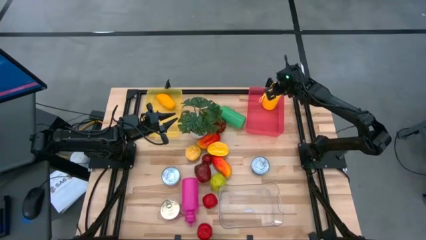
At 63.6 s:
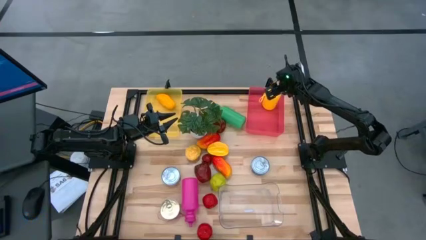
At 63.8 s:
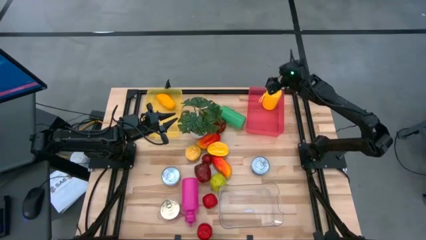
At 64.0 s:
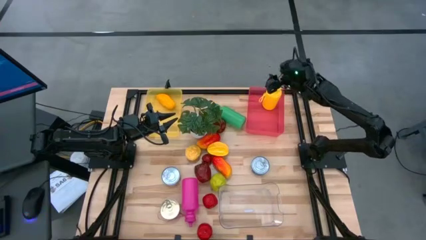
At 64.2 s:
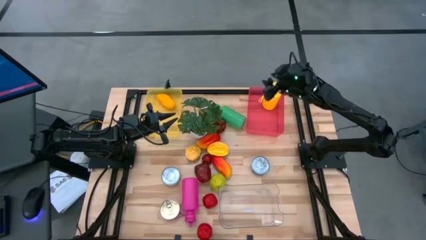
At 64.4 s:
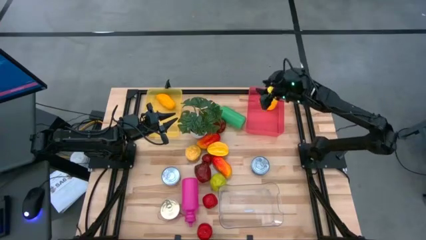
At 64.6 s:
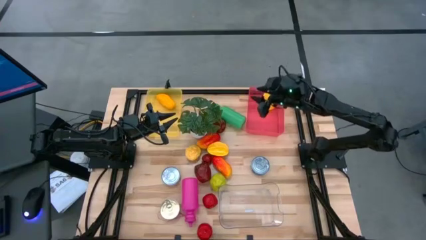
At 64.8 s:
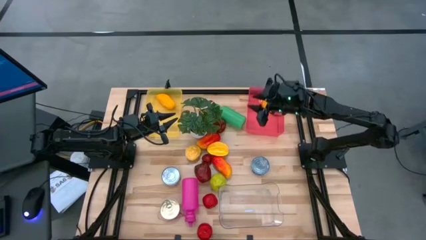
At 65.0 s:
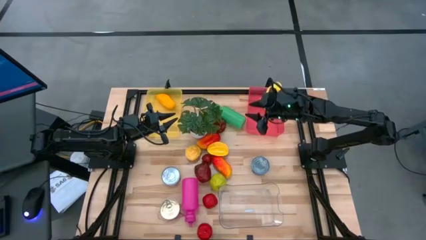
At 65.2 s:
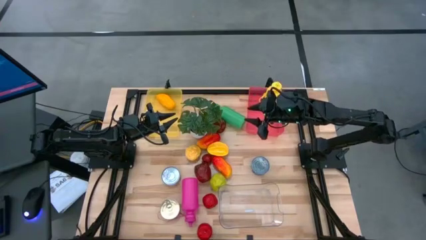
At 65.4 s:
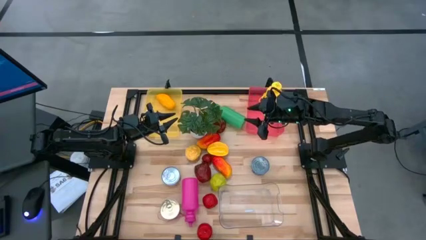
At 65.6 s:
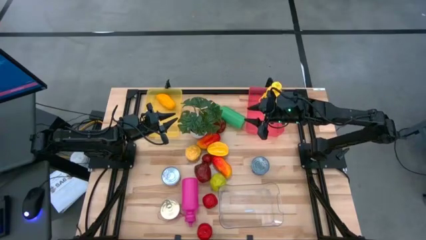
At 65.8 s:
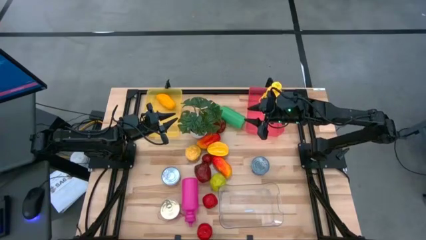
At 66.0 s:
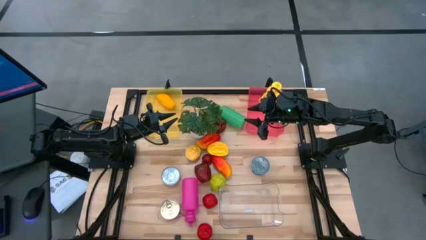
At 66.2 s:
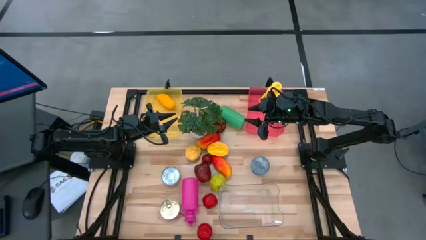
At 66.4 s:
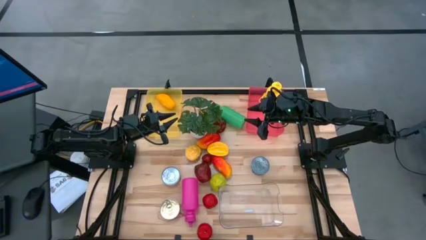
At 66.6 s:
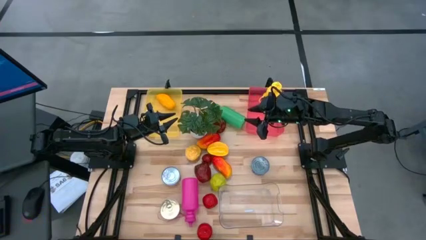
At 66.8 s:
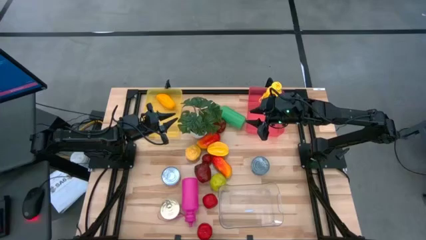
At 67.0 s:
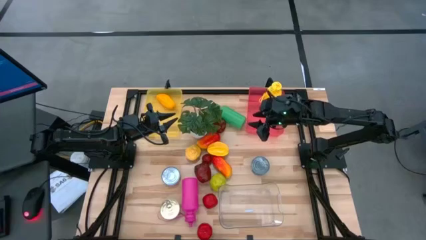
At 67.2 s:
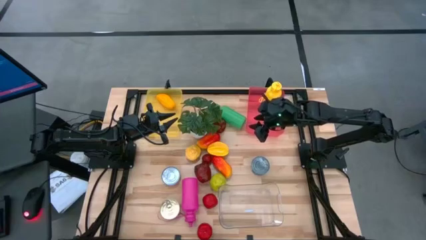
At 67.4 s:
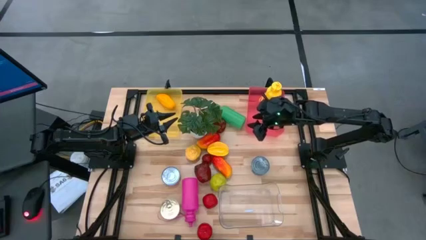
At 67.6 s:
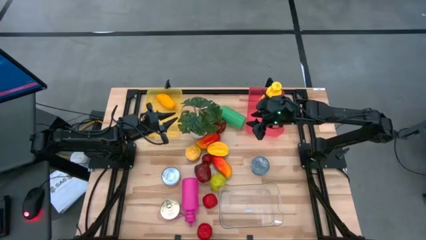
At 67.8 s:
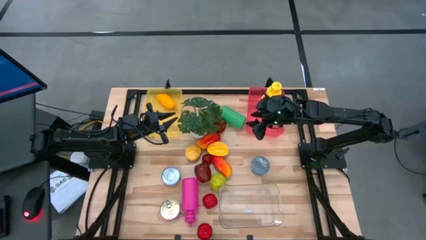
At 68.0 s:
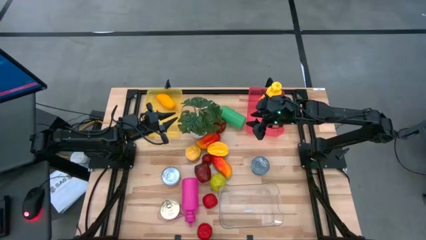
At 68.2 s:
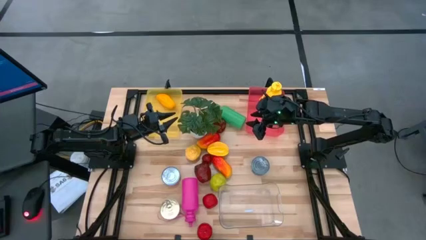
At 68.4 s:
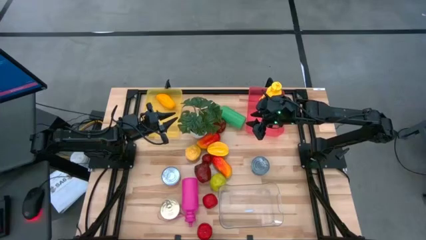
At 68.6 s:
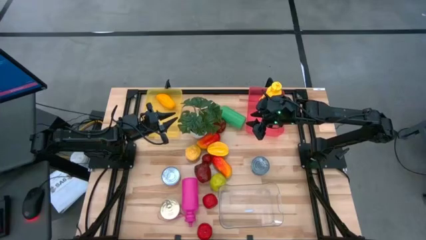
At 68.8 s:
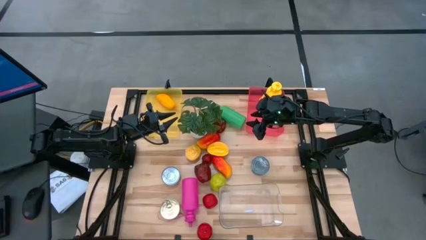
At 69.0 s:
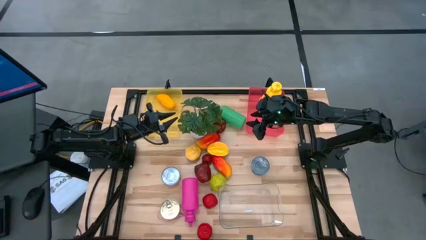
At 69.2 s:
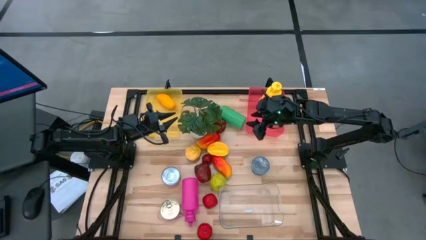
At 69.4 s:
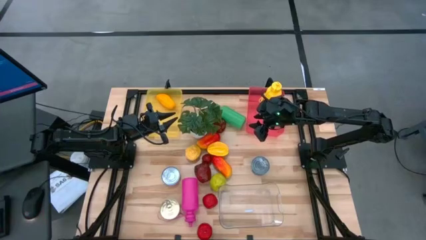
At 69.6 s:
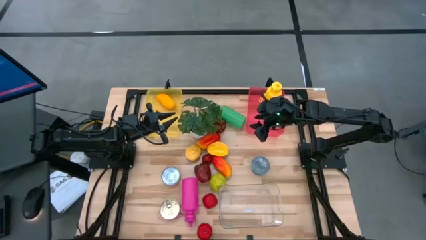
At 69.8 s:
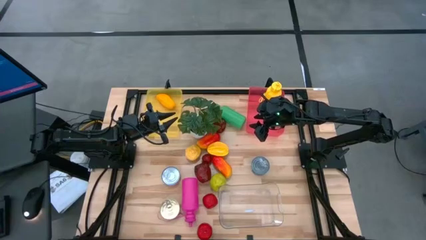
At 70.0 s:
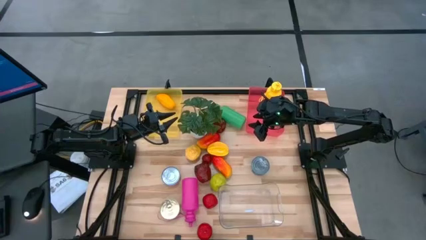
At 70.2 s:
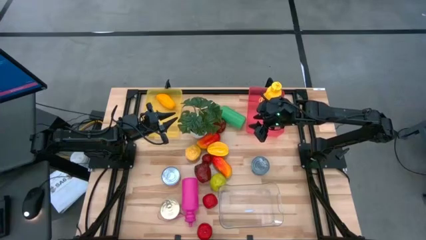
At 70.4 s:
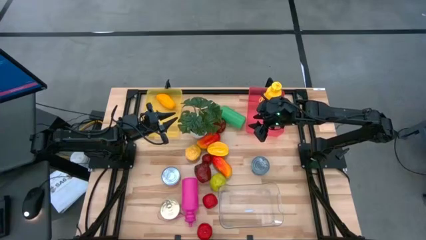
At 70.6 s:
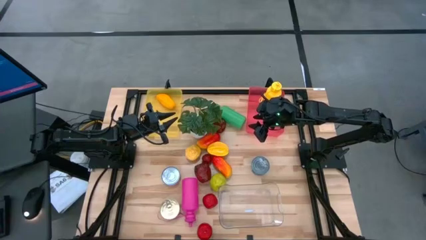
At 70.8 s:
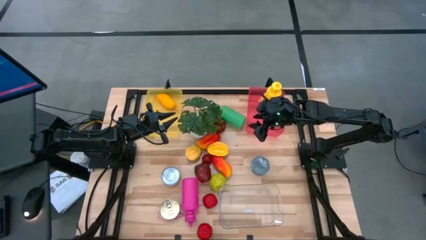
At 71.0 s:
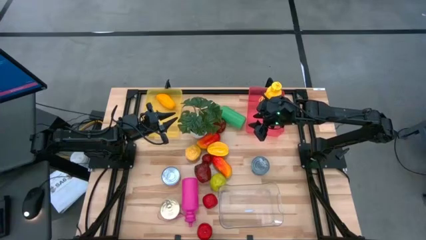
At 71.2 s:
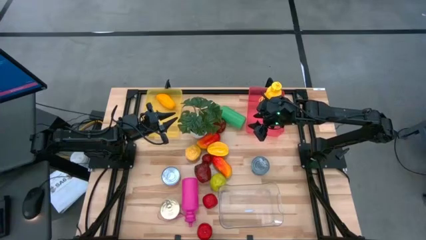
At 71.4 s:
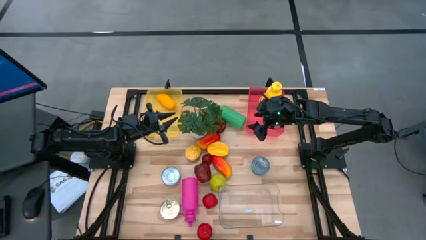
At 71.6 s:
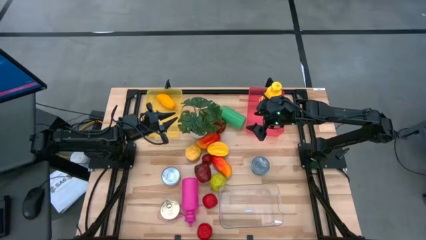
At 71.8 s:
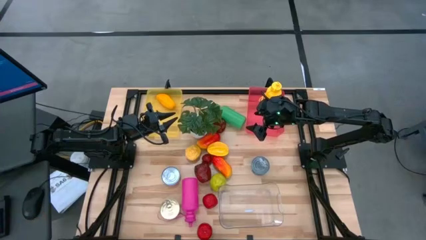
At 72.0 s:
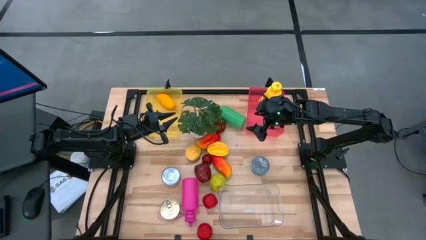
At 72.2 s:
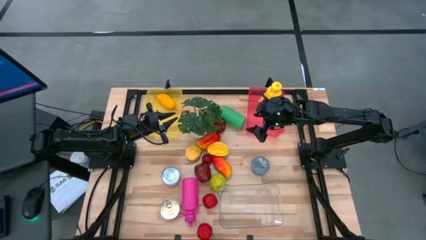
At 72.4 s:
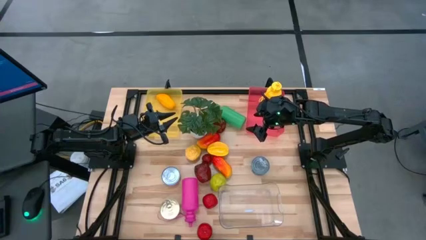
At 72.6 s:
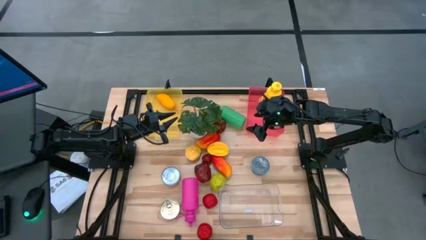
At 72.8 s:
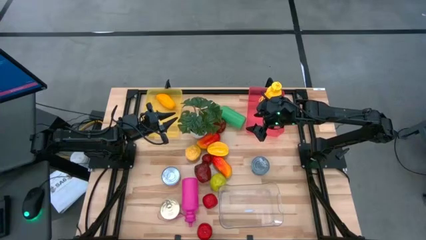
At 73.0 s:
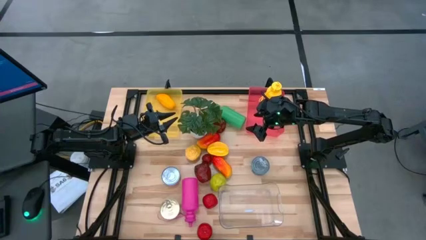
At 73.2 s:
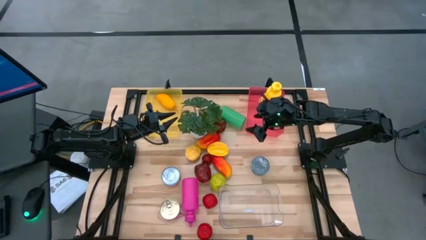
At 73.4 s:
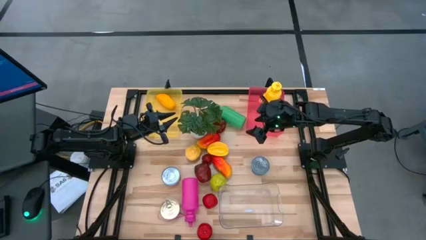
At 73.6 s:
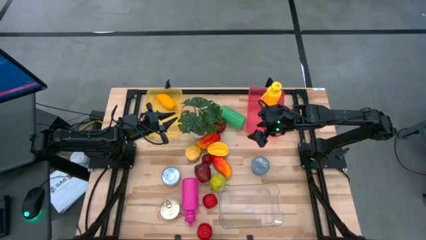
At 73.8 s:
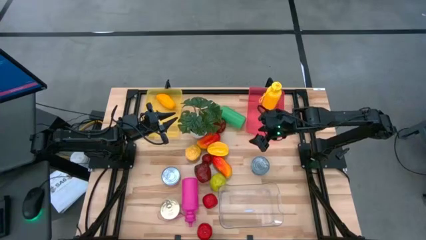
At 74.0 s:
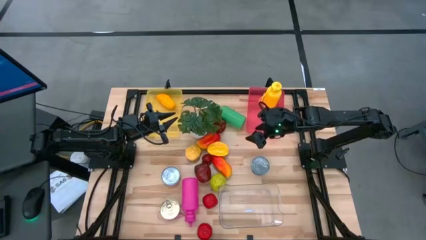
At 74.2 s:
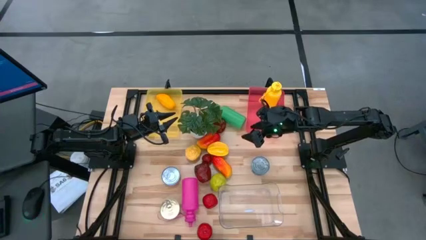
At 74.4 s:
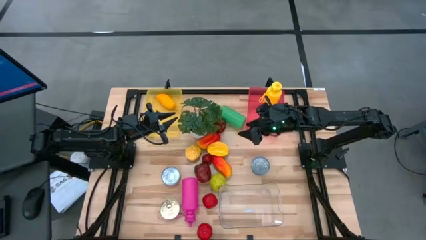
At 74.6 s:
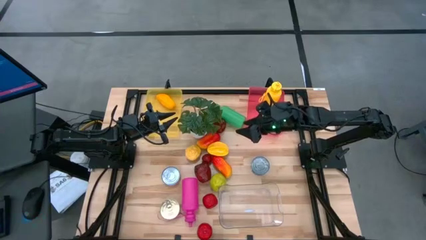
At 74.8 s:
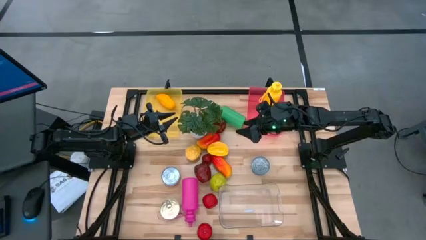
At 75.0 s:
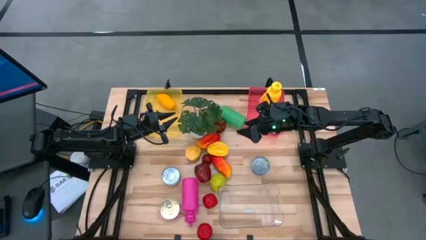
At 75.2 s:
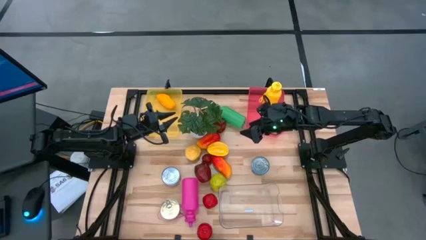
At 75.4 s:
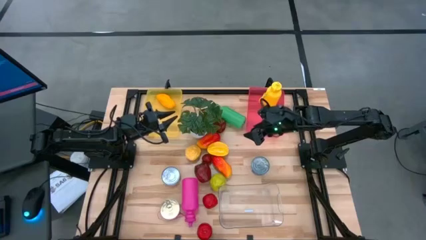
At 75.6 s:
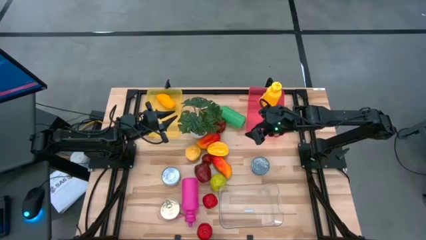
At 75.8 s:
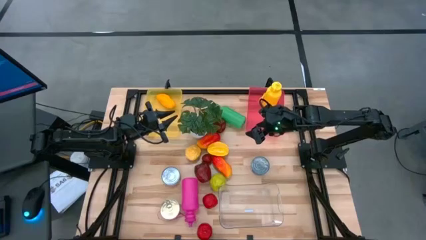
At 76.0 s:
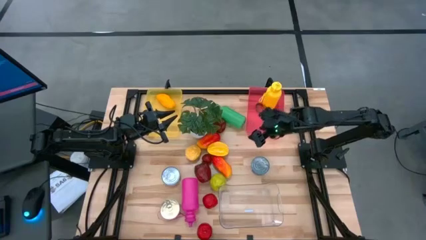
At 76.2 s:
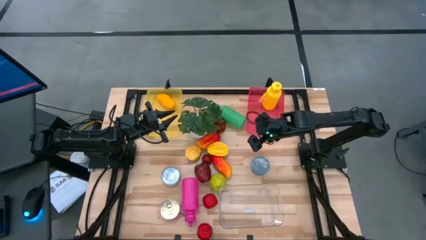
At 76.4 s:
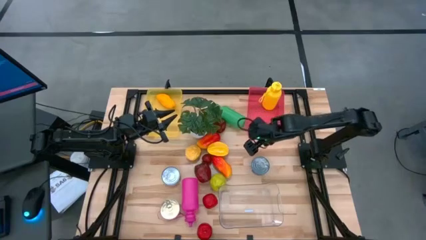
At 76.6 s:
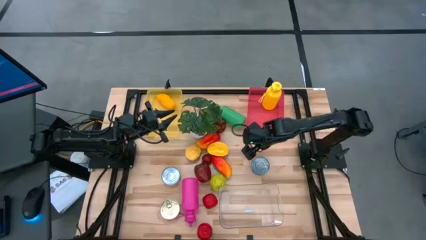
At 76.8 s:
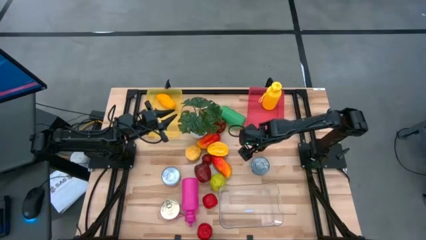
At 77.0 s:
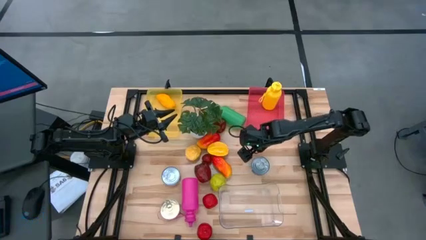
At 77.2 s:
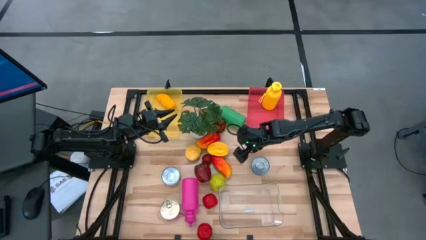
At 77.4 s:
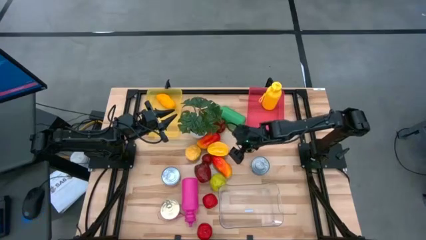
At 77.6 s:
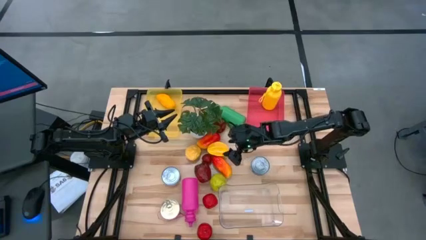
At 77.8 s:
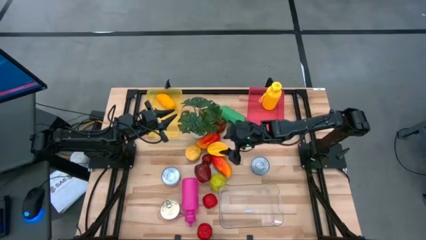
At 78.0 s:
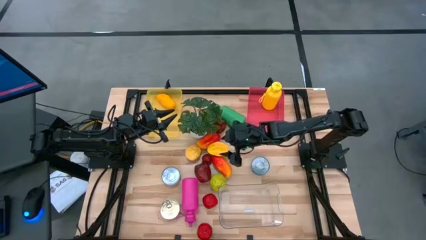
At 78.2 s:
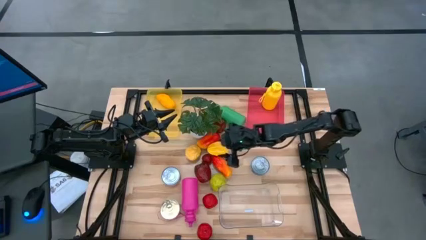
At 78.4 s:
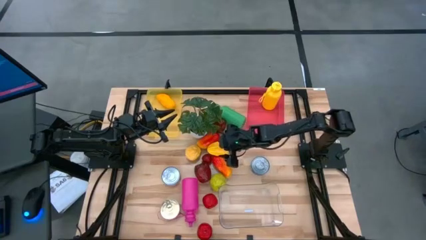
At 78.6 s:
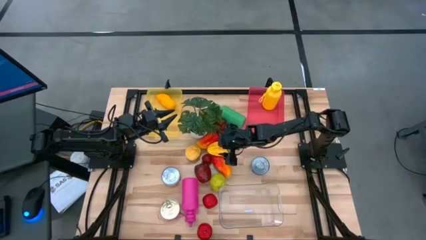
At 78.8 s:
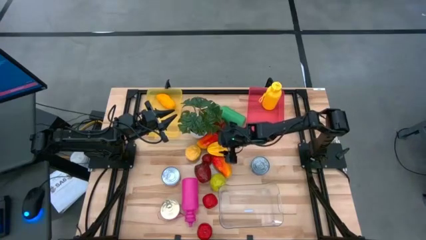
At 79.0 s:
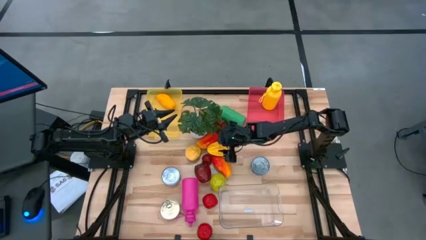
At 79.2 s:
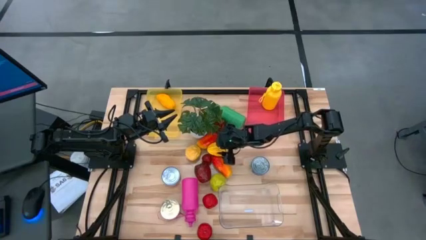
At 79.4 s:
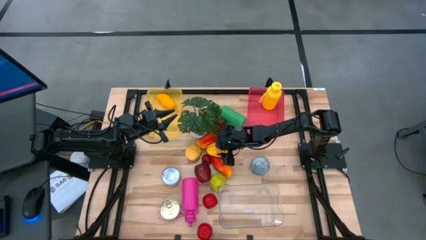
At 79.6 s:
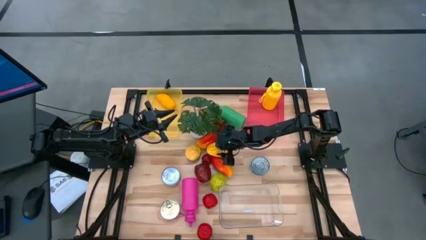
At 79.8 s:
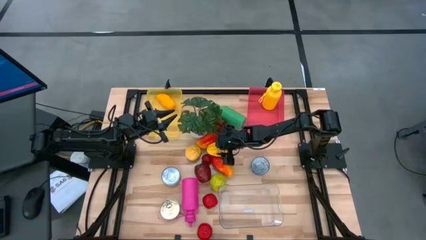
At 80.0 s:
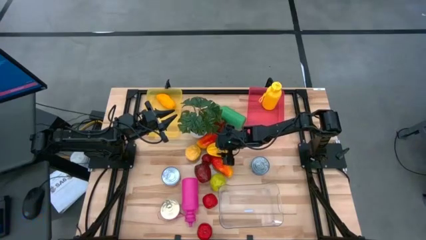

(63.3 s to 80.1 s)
Task: Pick & Place Food Item
Put the yellow starfruit into the yellow bin
